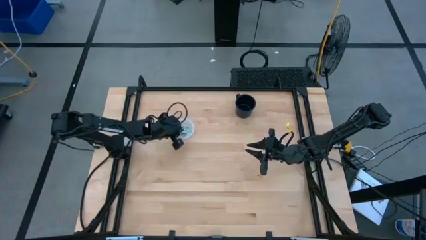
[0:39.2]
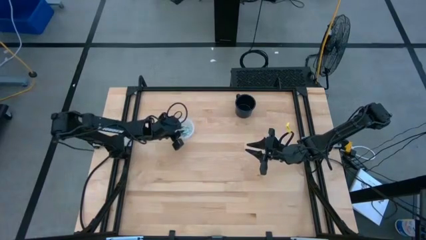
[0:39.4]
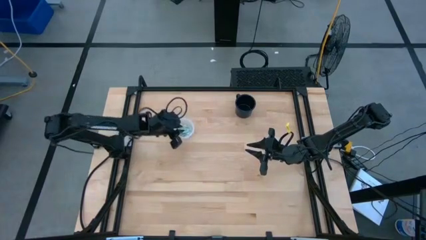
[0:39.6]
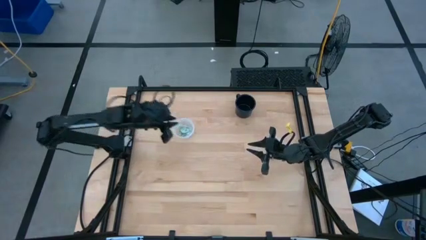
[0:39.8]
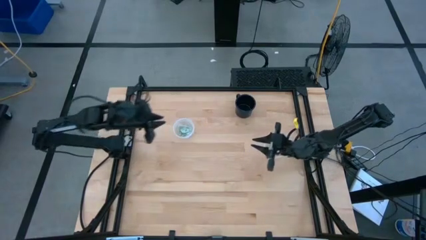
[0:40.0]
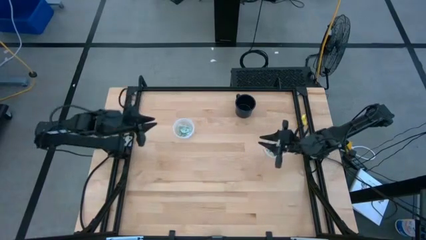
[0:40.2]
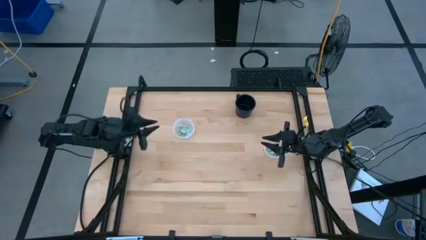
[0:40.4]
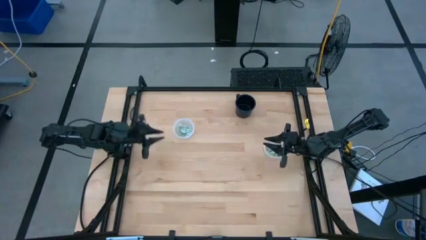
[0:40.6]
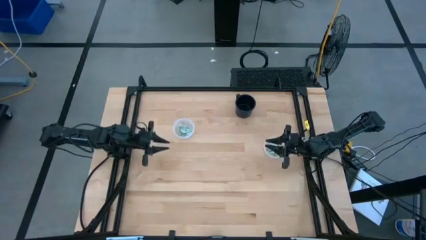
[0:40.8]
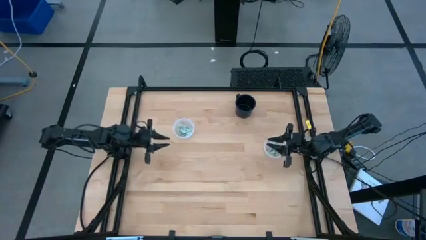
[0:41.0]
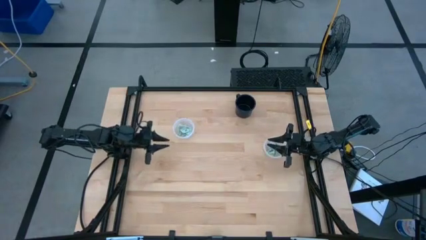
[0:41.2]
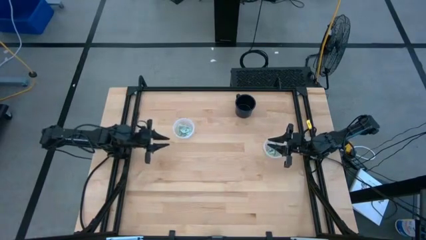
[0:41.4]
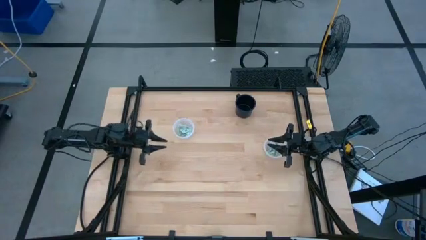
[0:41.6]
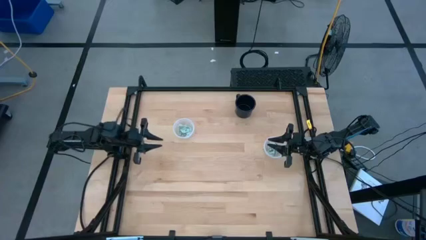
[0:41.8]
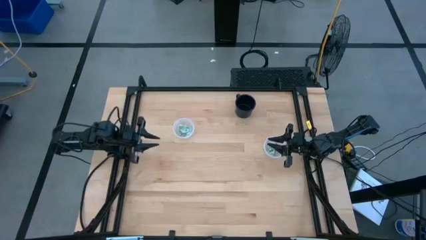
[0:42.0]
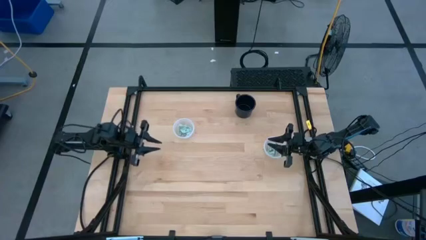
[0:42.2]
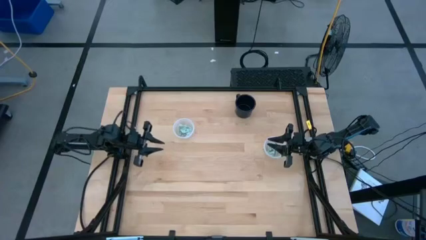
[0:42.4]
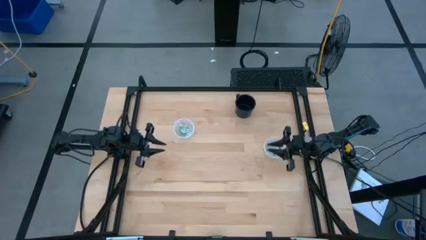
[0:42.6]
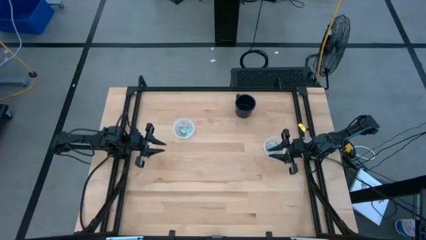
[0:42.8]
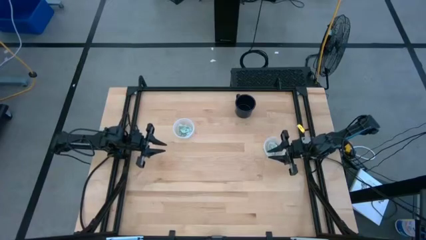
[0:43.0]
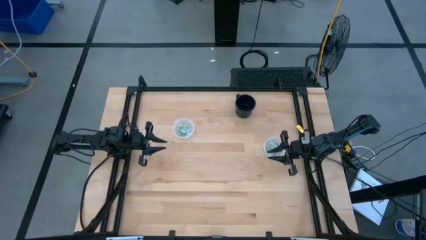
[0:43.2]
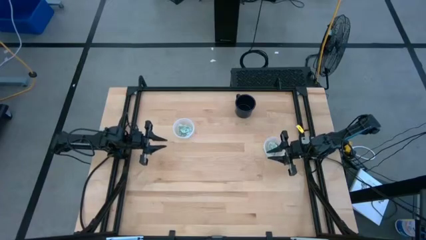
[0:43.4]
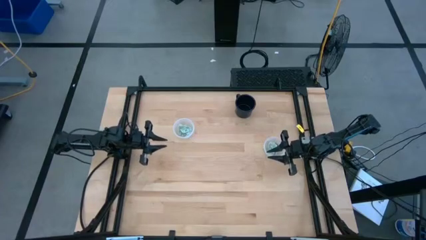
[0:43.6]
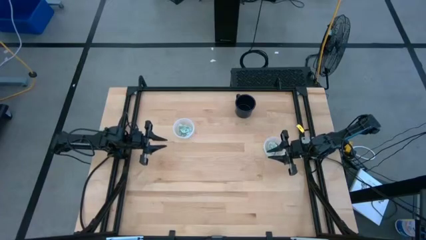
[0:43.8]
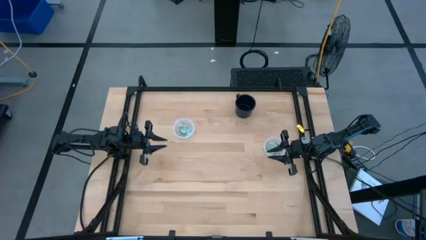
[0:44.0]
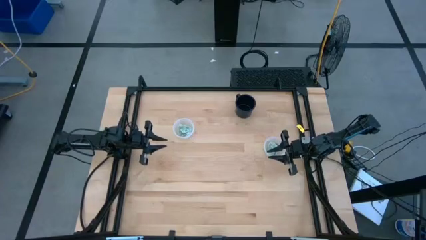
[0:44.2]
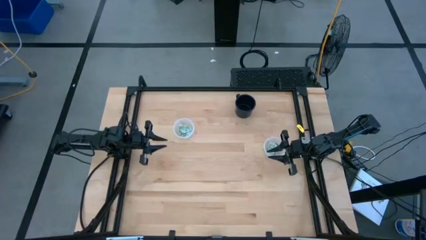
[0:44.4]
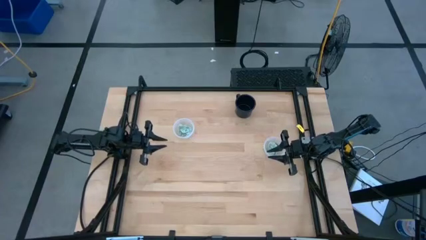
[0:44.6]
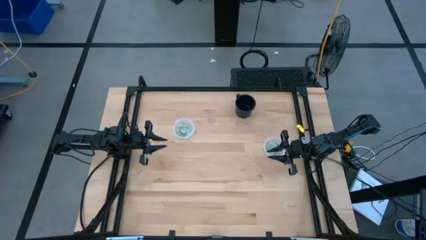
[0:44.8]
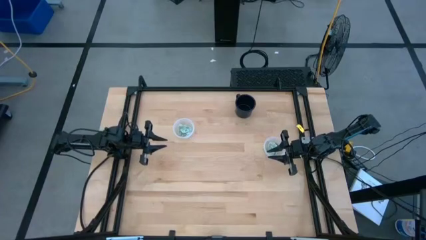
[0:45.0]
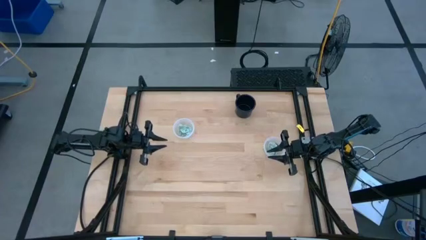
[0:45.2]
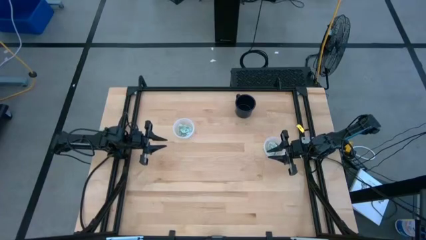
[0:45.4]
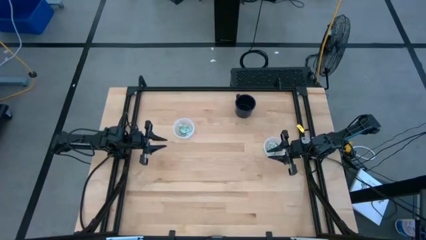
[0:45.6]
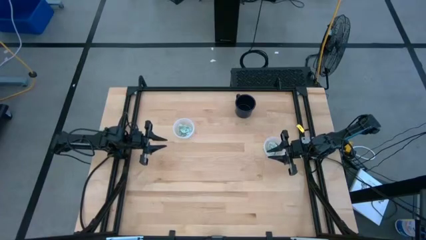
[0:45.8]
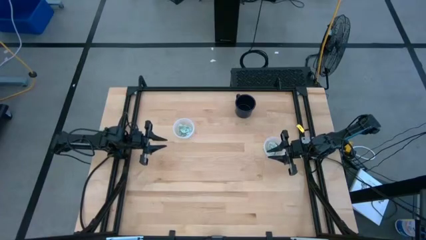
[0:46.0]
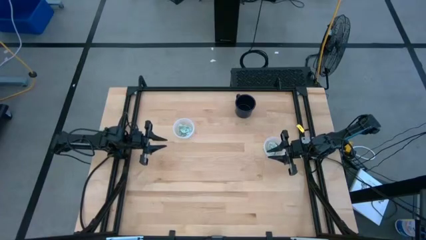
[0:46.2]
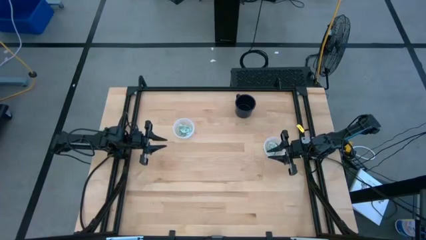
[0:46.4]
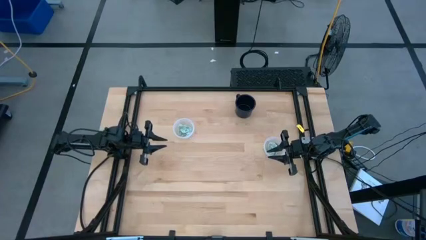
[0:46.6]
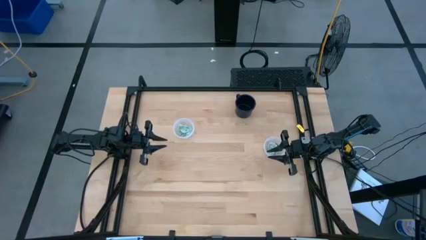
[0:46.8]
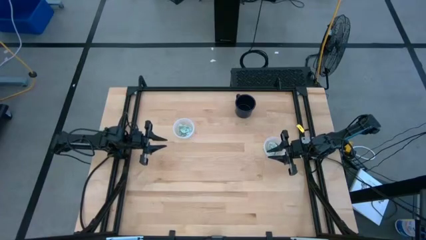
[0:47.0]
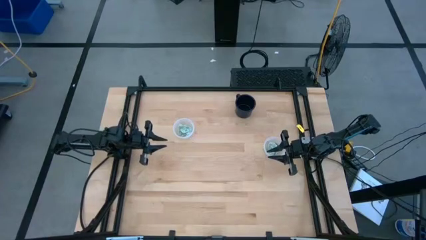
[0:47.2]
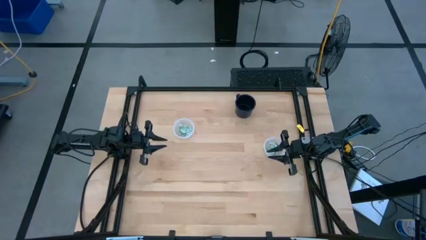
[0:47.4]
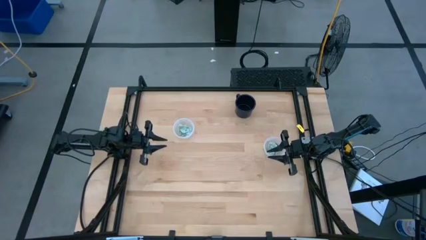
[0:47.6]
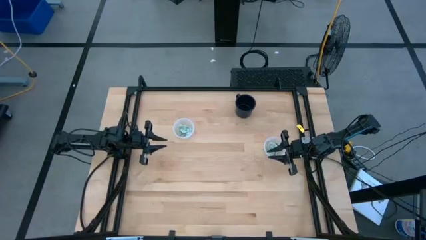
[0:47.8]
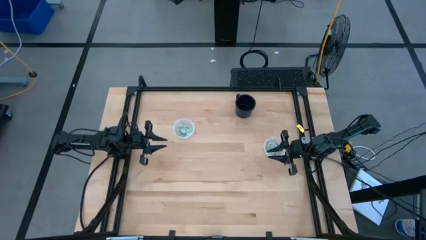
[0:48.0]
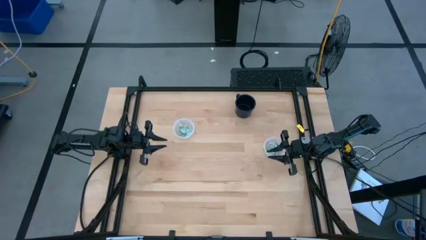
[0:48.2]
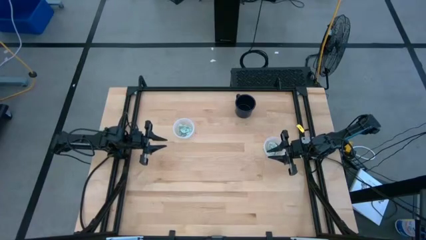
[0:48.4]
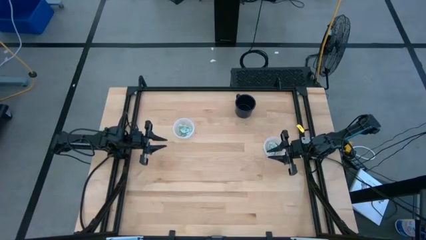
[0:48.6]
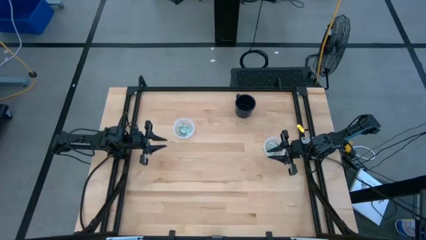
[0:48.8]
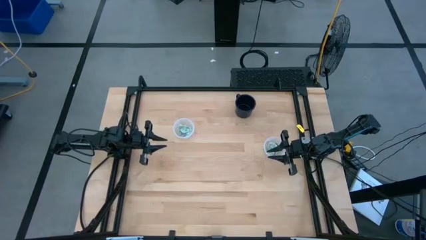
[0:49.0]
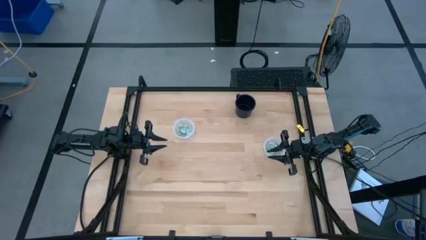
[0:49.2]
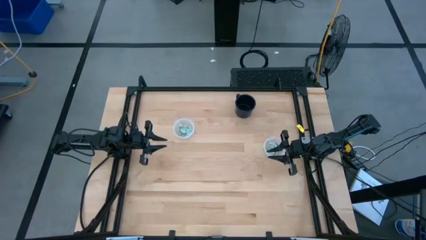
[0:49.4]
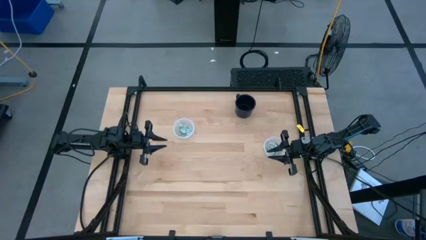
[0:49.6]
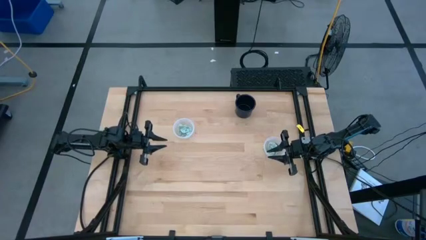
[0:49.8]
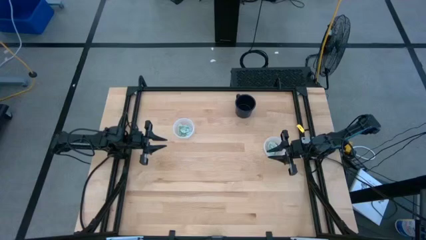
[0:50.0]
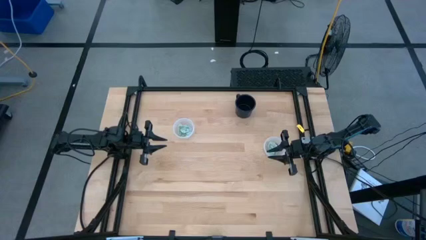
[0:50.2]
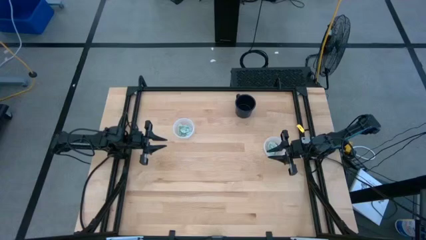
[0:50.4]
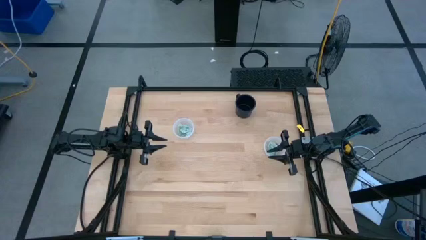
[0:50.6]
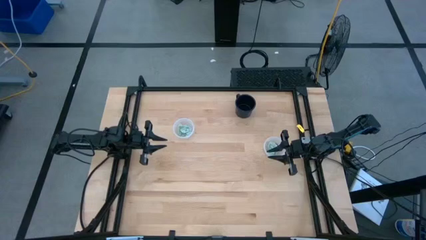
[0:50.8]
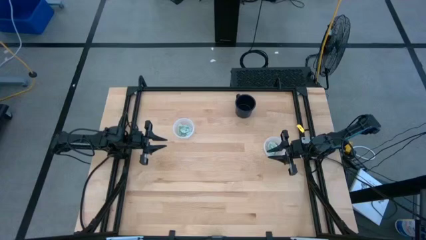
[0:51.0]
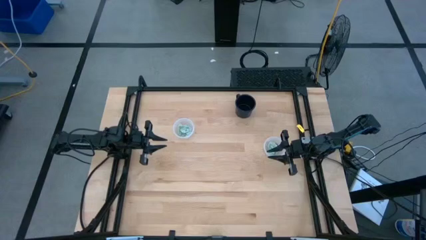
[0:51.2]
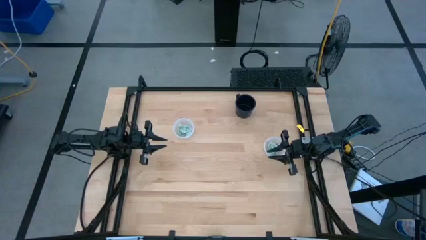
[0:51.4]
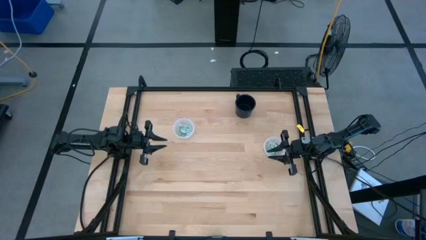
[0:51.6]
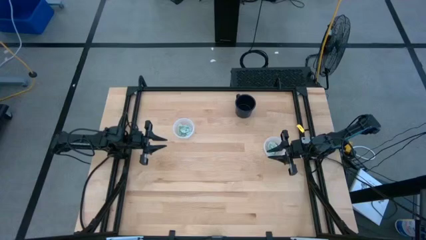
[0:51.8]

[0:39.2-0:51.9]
Task: Pick and place items into bin
Return to Home Position
